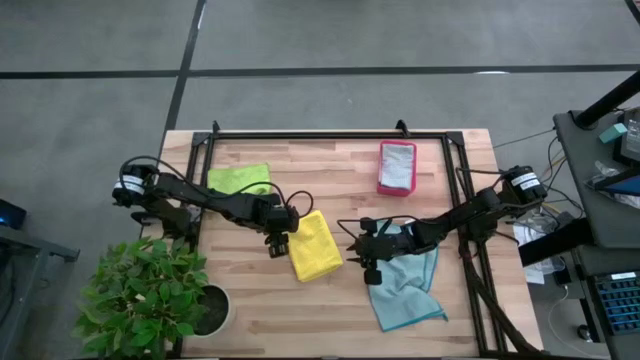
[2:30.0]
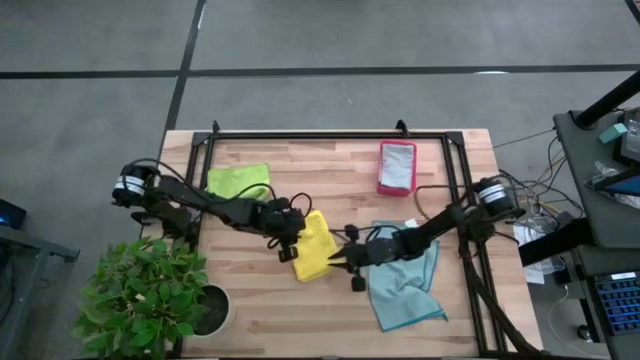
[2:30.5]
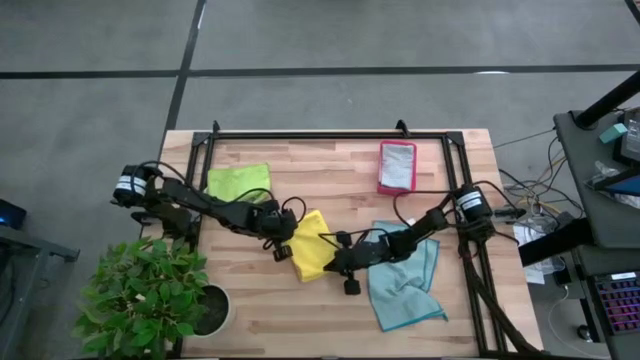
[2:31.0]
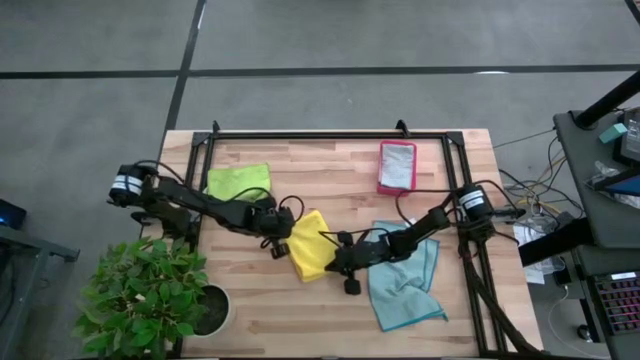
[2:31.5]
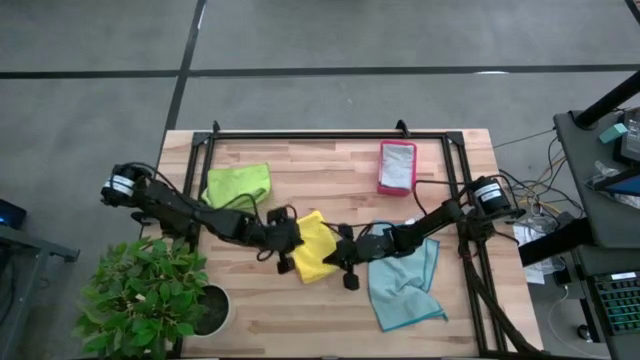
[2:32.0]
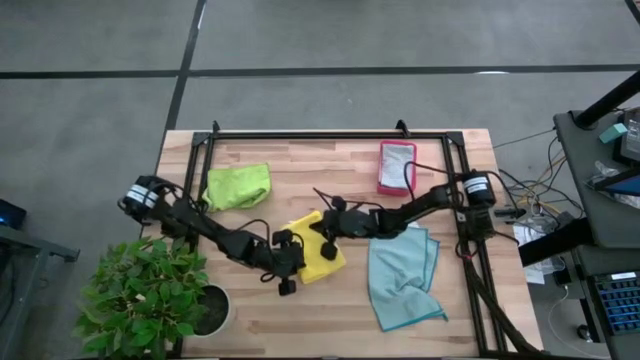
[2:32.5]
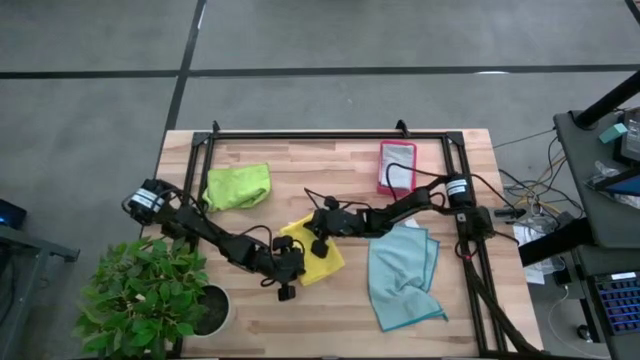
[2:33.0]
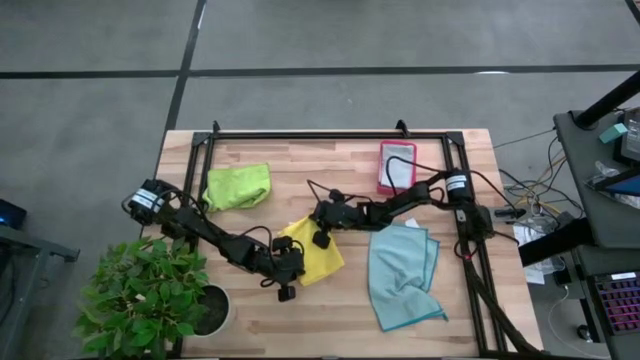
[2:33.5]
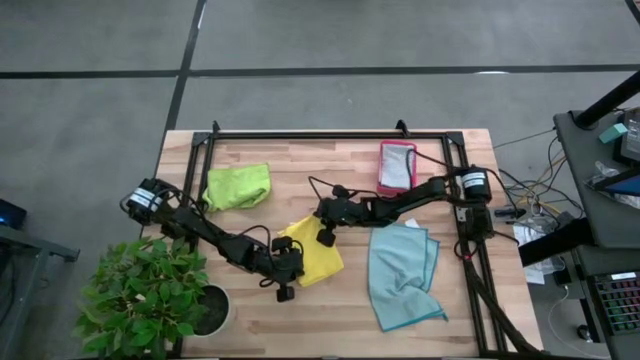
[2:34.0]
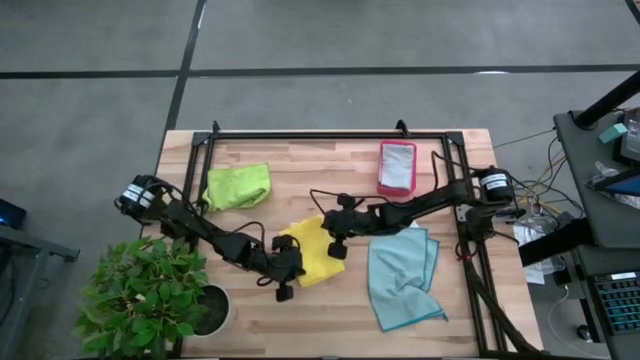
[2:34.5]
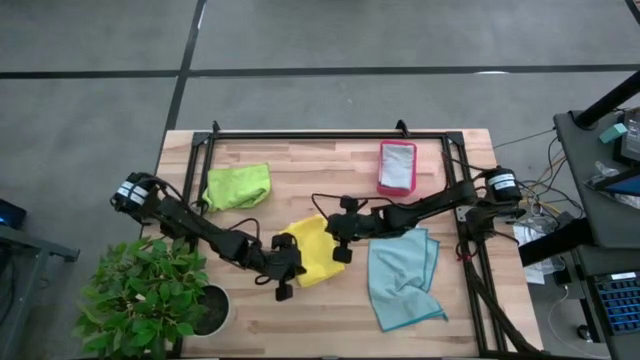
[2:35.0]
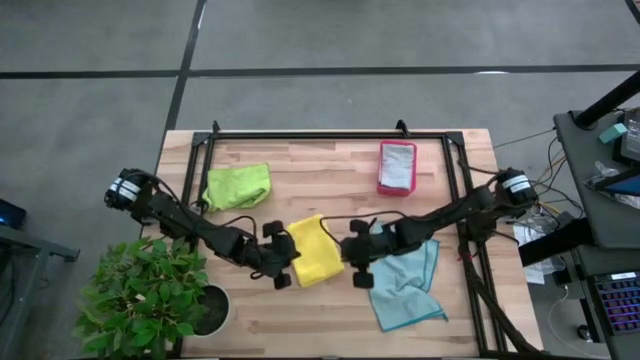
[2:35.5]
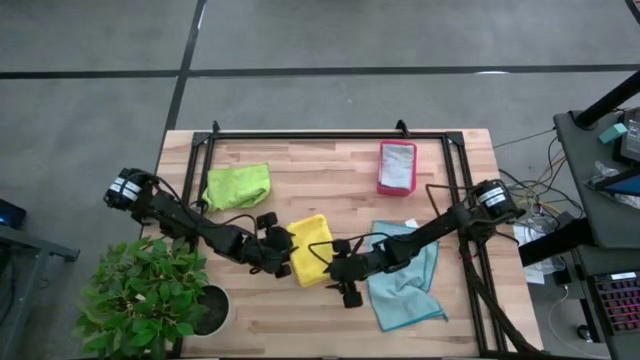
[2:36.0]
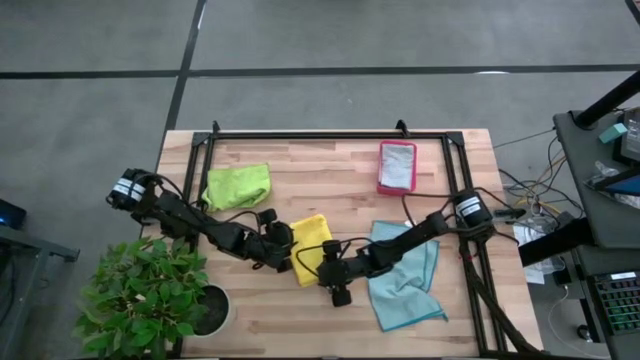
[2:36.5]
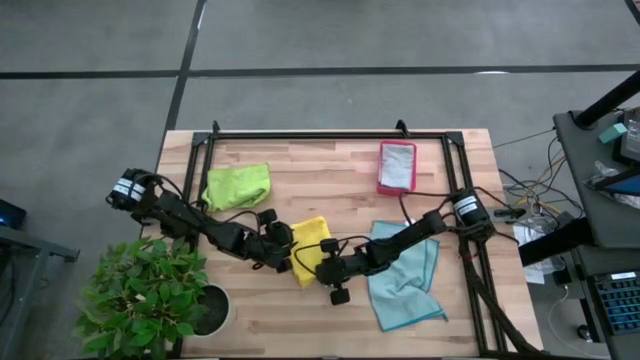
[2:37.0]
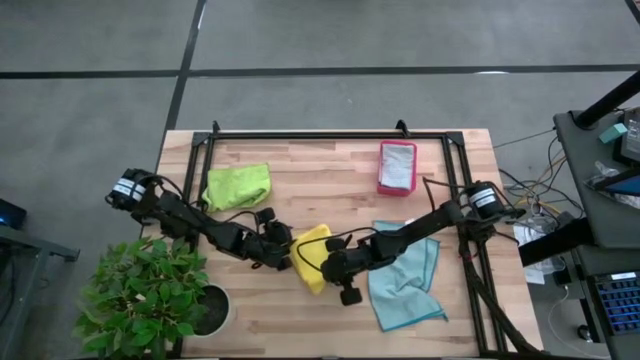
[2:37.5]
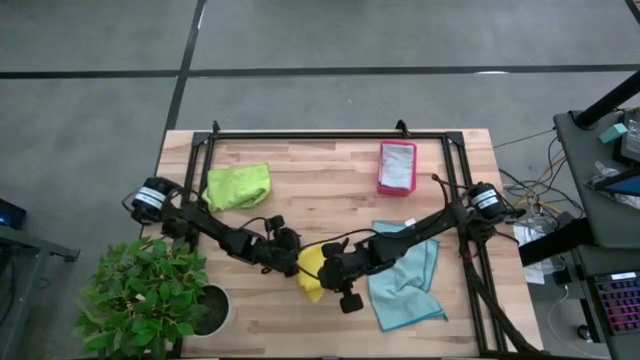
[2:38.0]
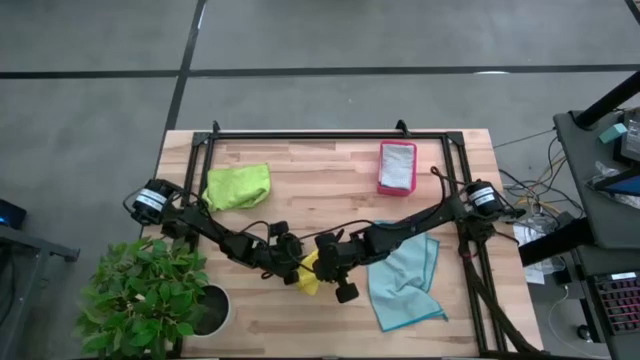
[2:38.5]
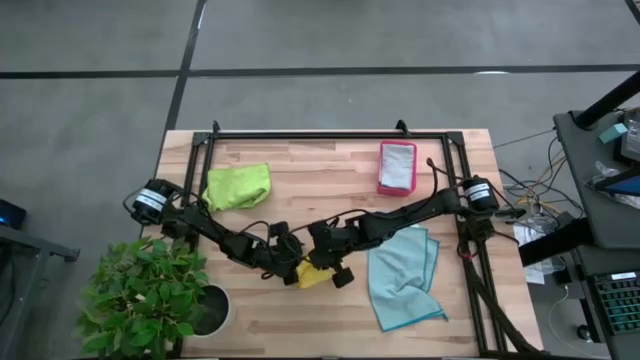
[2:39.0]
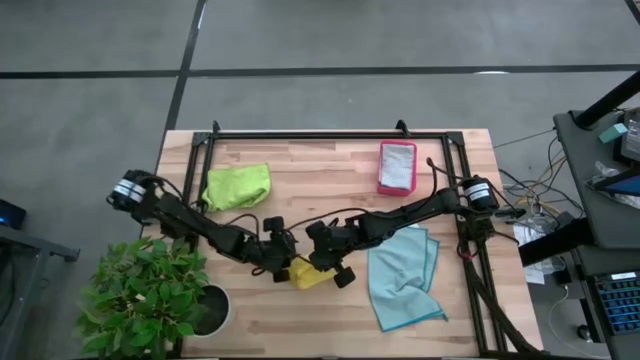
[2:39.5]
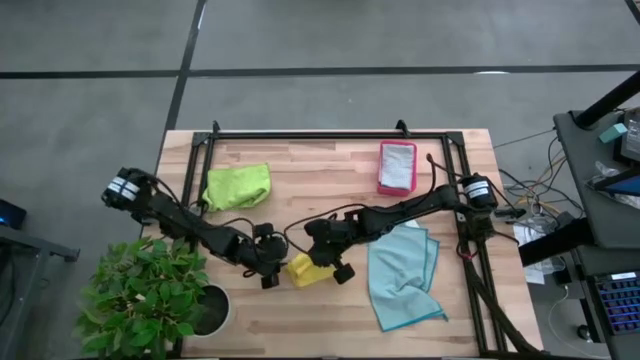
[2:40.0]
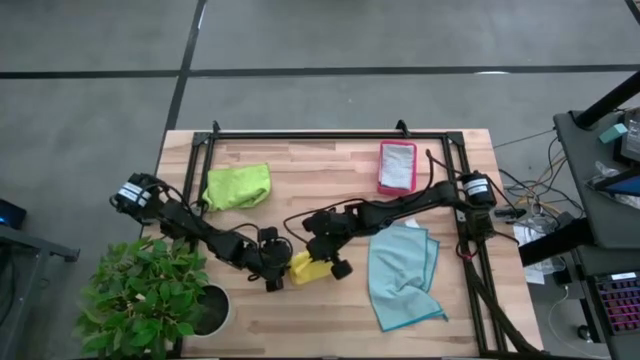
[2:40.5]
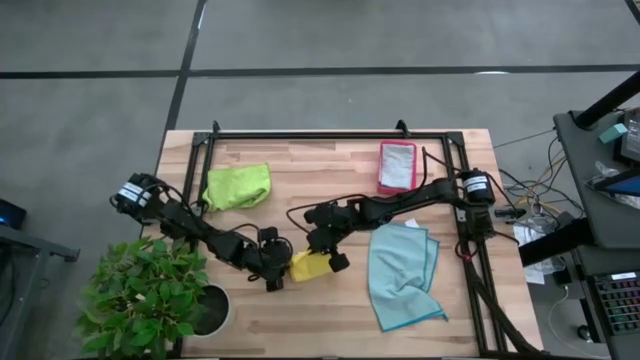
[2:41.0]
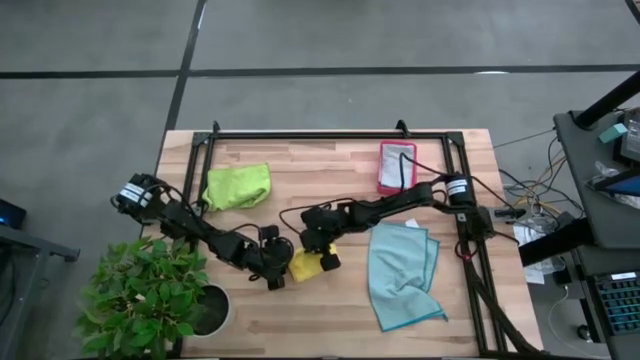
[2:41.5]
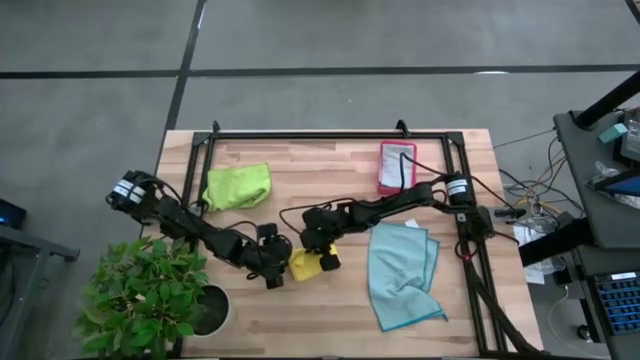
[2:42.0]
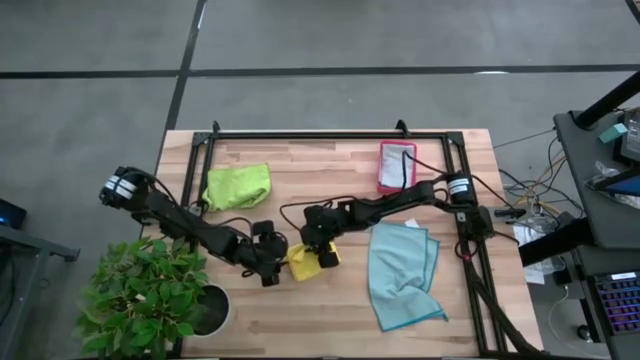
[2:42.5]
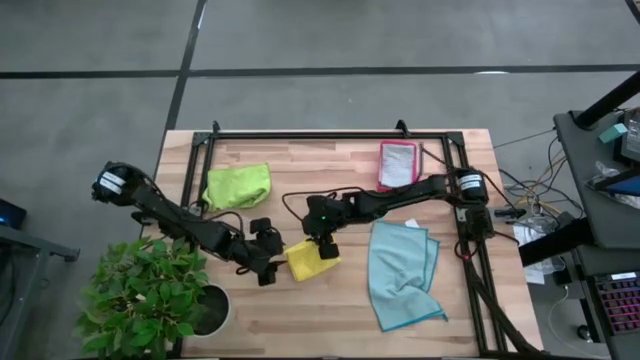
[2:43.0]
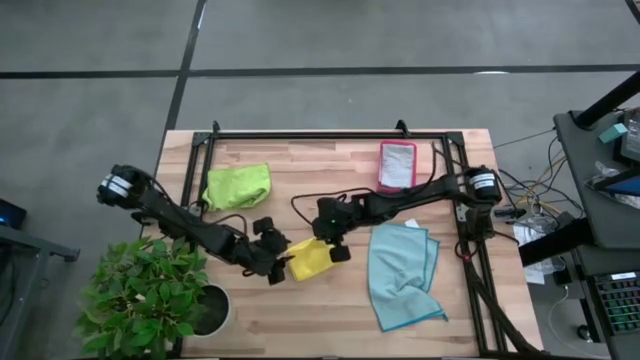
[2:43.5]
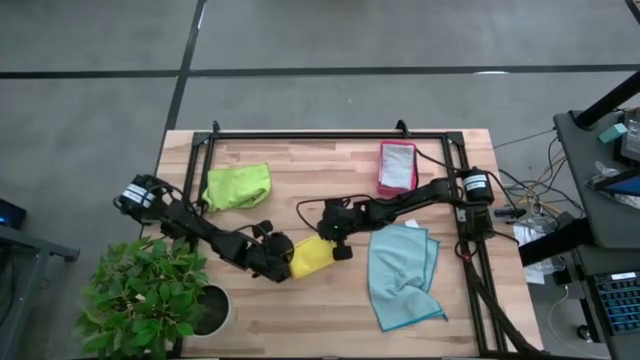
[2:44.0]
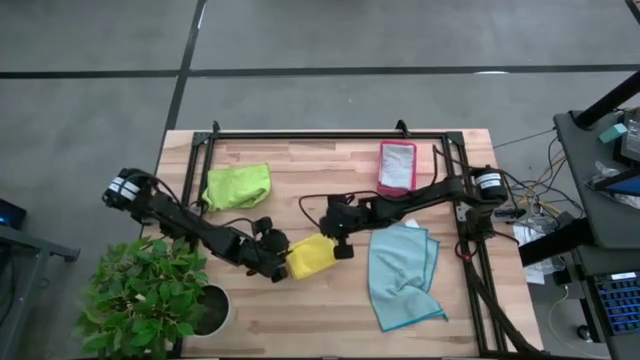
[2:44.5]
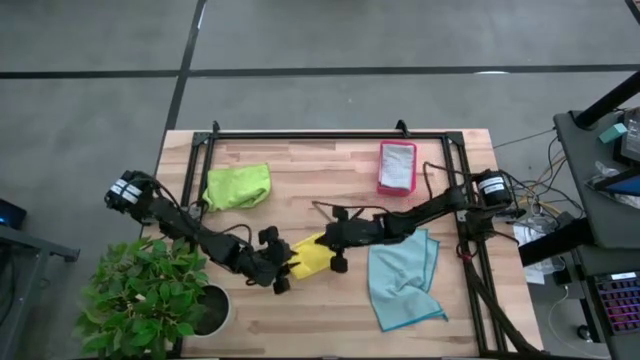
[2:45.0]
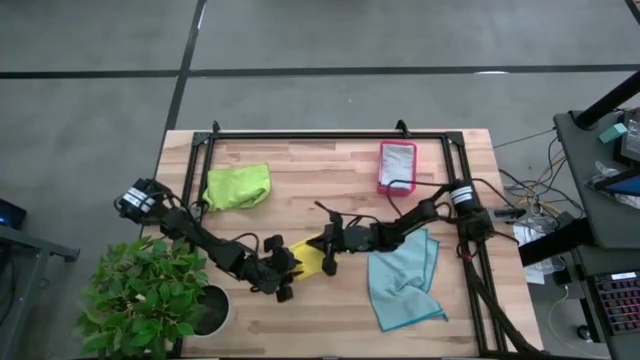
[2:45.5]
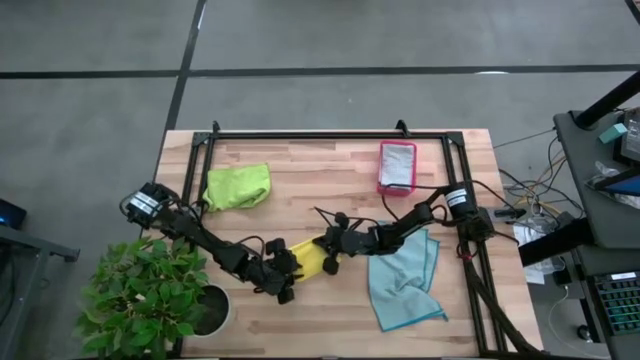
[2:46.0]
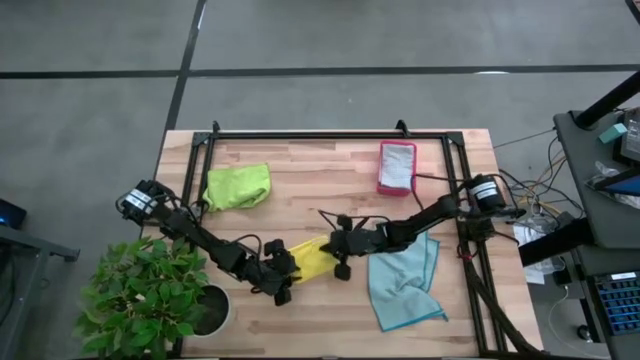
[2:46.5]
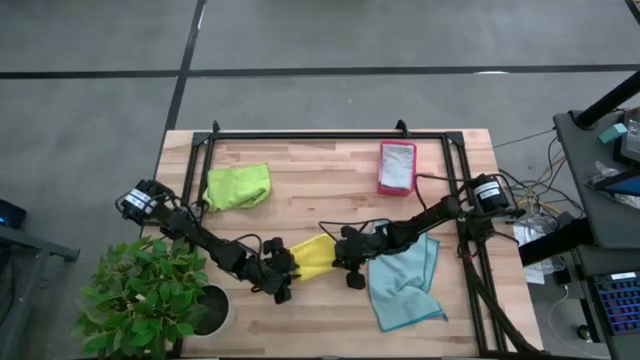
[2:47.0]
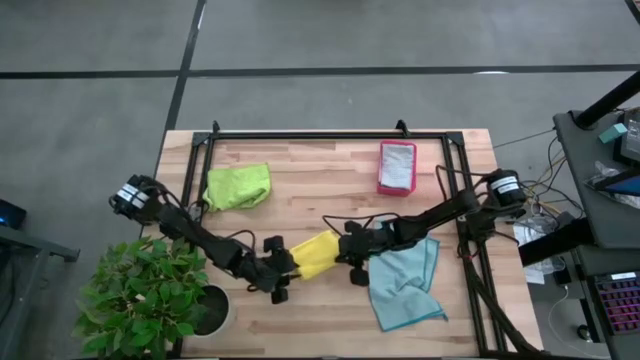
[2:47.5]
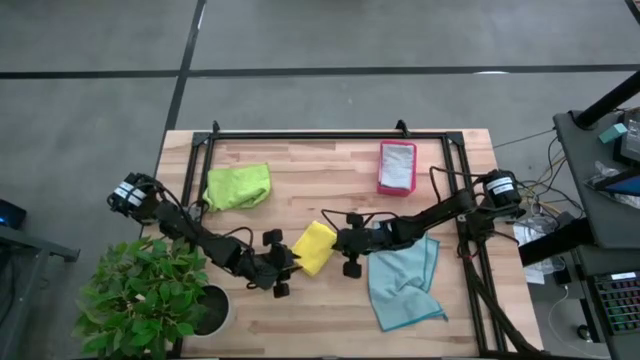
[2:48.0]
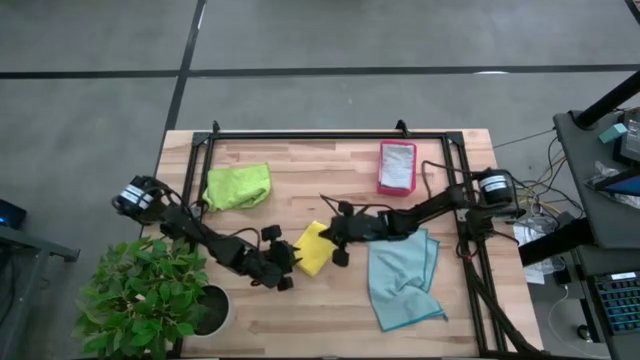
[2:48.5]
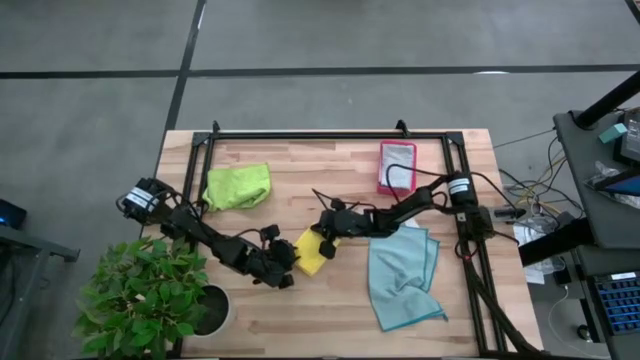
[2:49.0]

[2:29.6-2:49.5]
Task: Fold microfiber towels
Fold the yellow microfiber towel

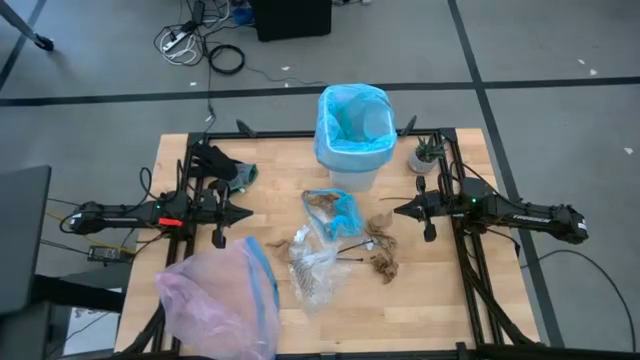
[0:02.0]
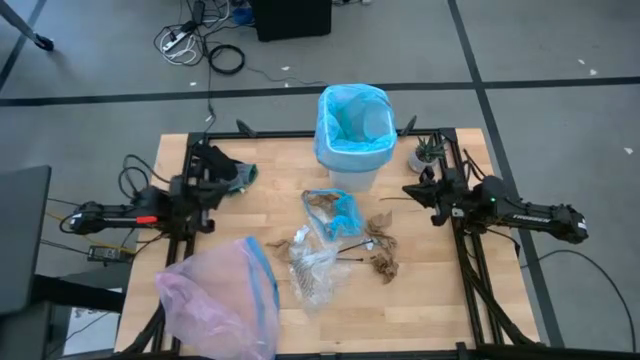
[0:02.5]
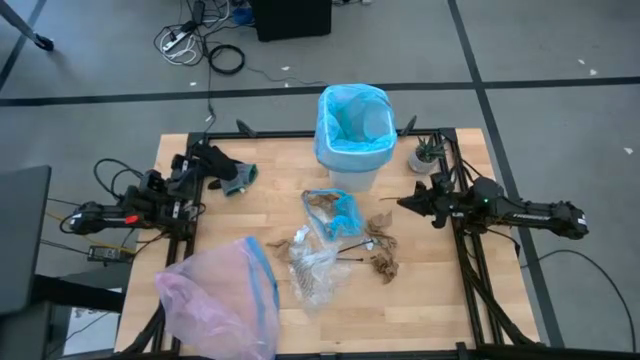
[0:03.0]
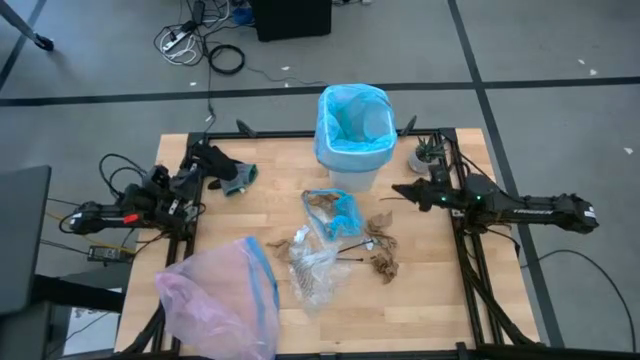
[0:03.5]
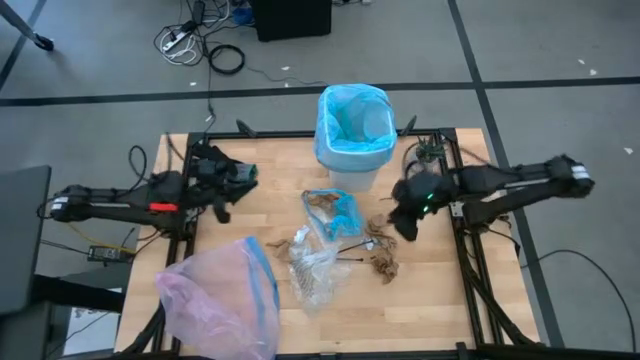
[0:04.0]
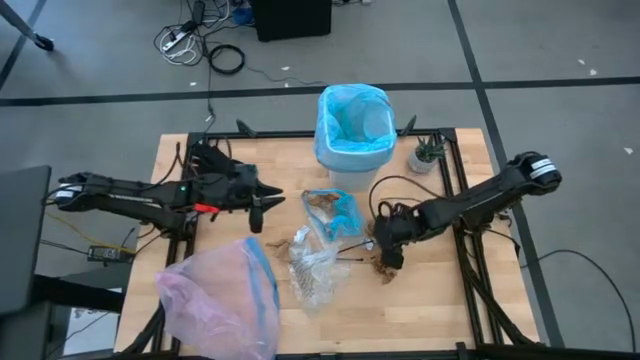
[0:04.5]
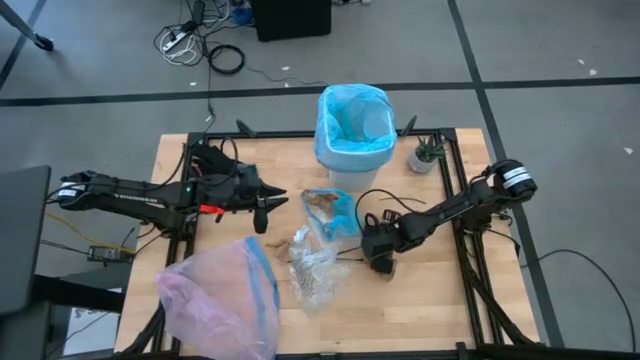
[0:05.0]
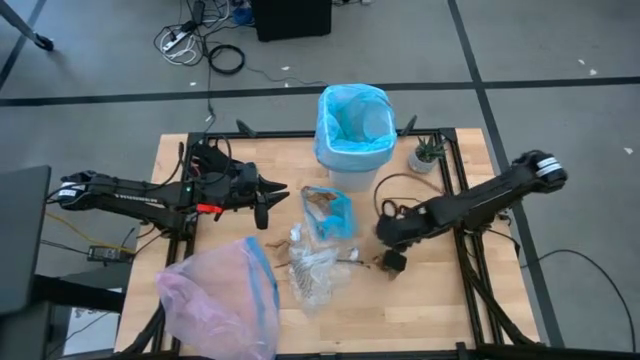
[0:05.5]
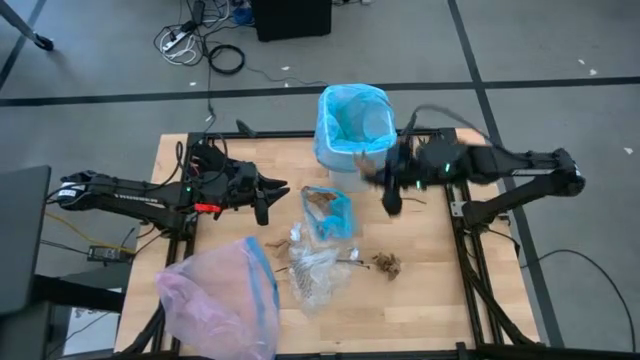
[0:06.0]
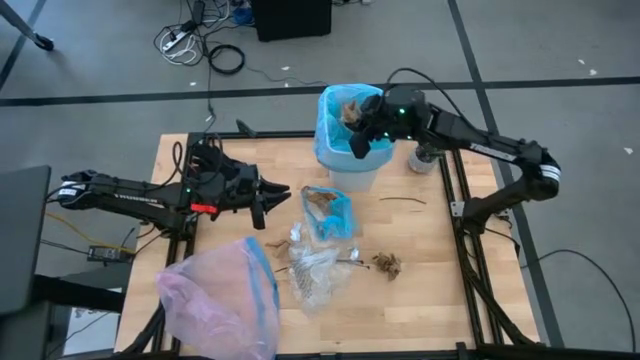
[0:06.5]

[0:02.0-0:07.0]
Task: place trash/remove bag and relplace
Put the brown paper into the trash bin
